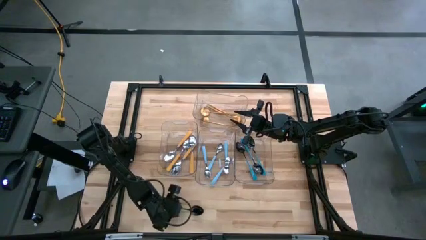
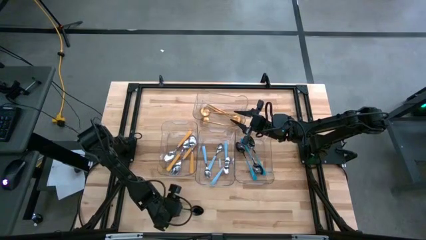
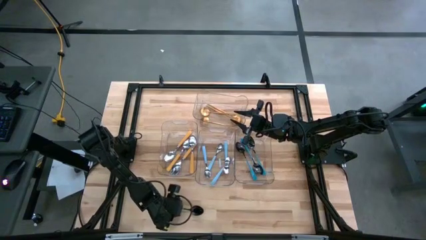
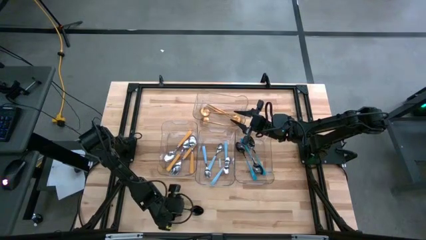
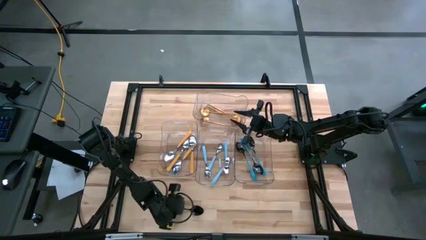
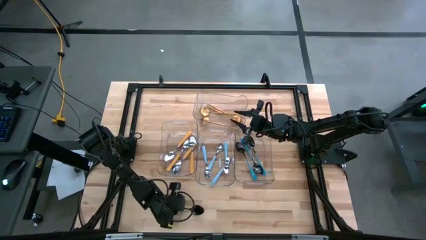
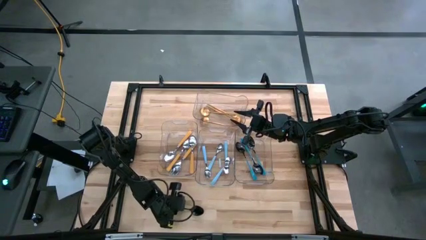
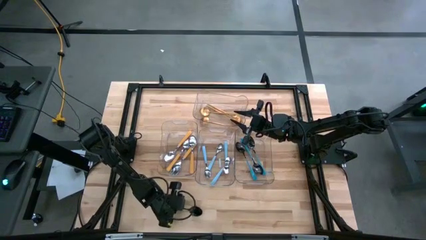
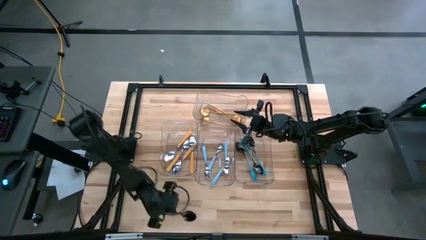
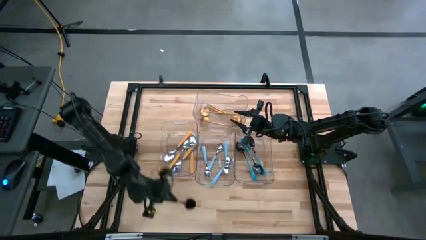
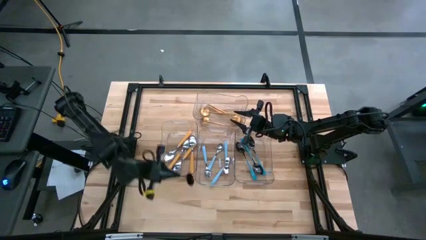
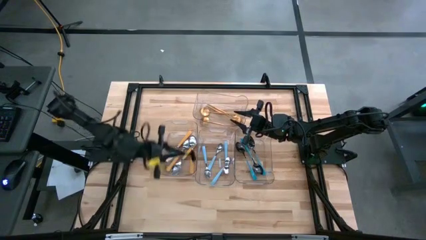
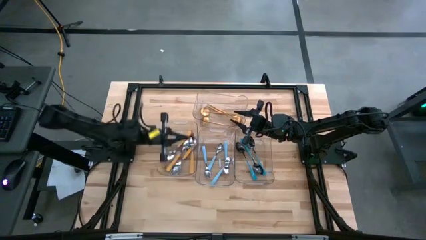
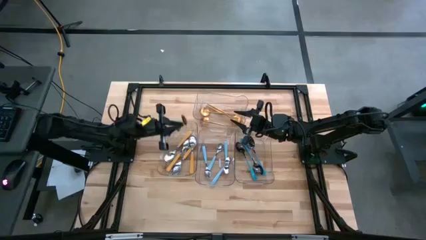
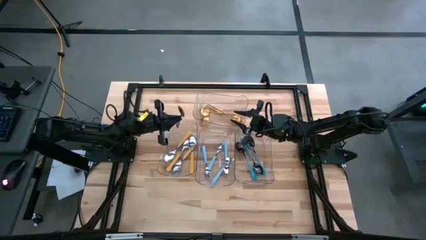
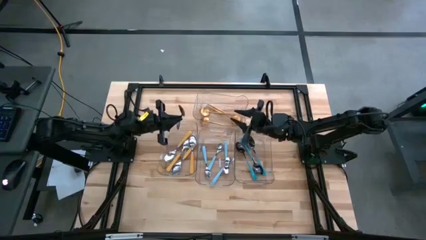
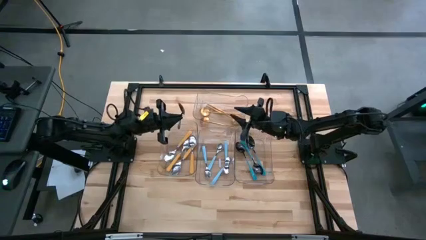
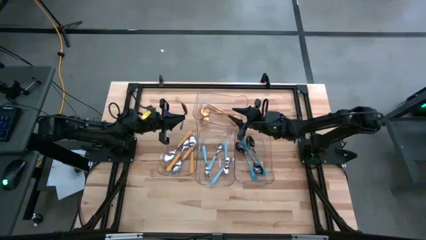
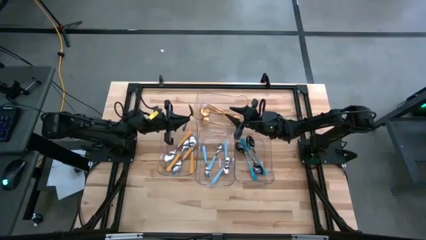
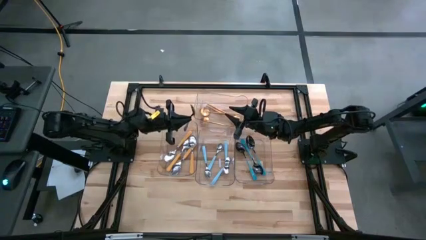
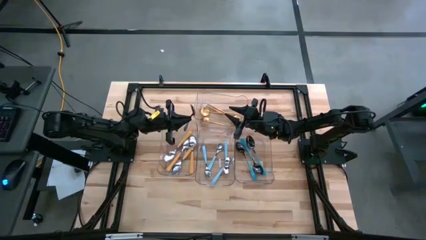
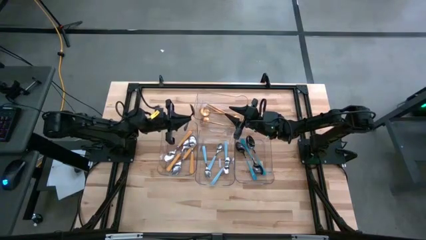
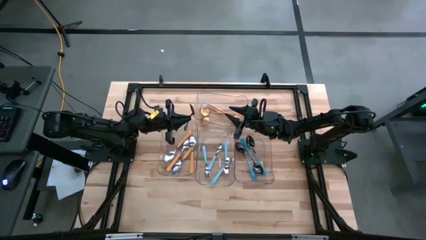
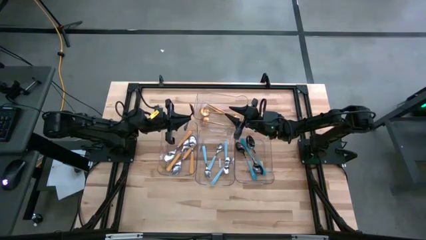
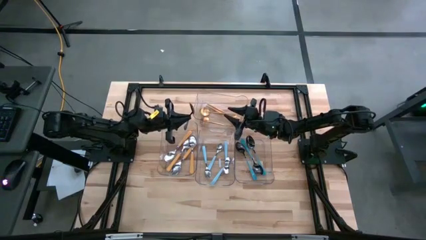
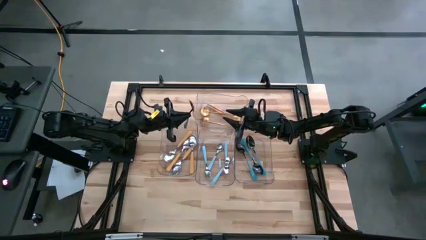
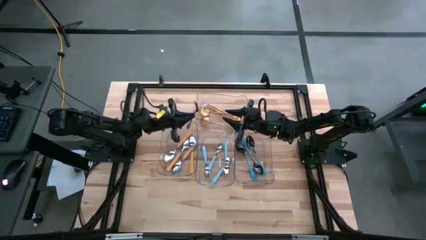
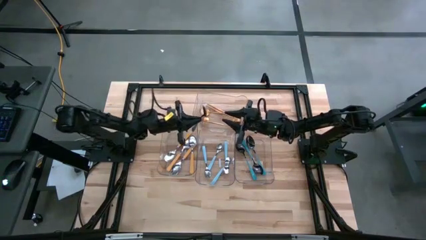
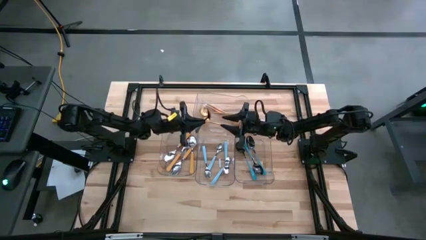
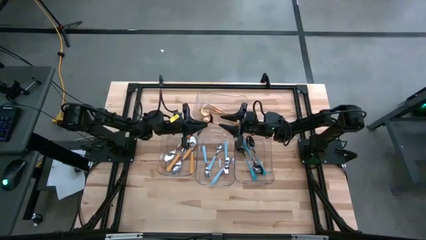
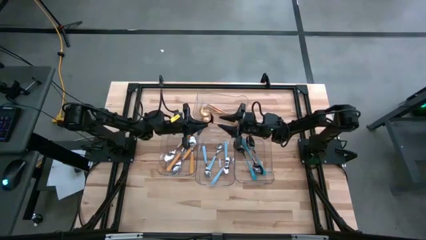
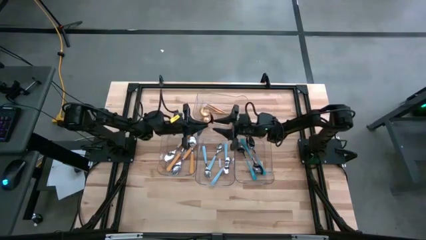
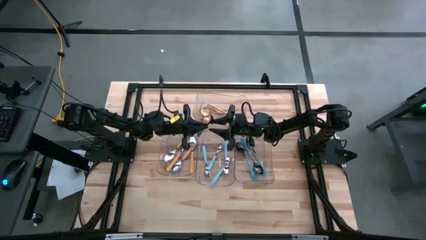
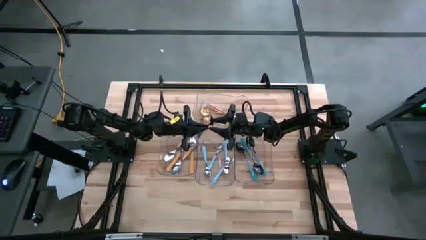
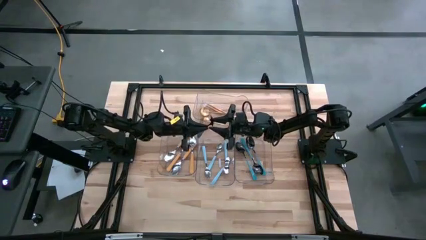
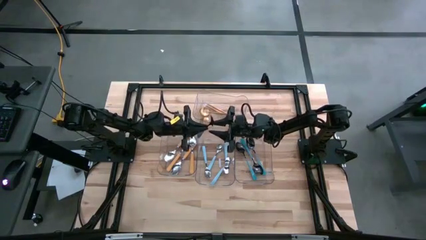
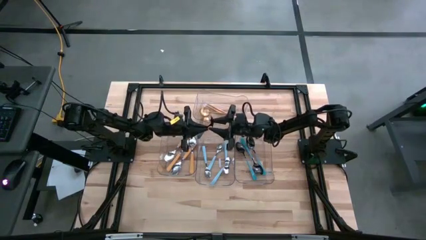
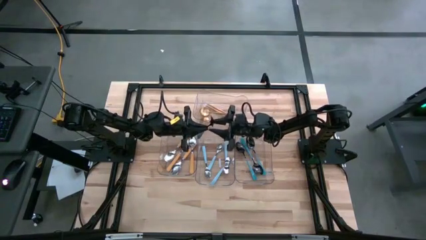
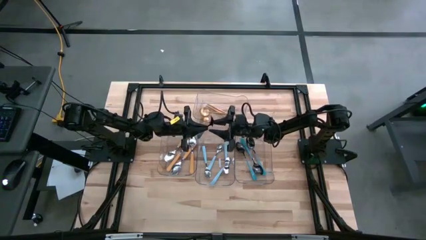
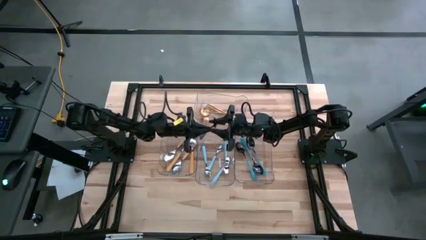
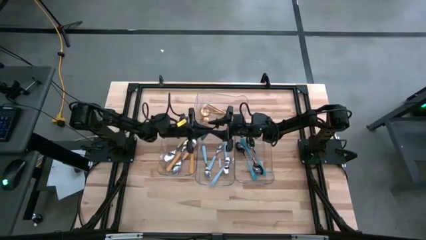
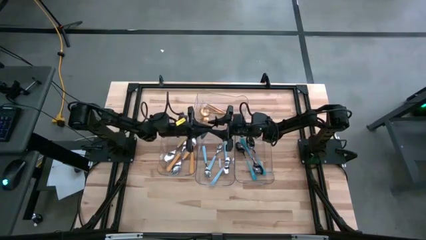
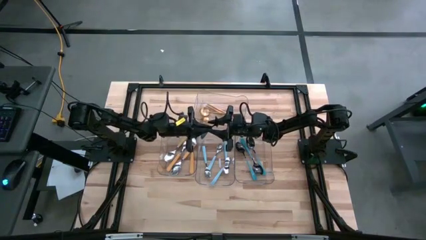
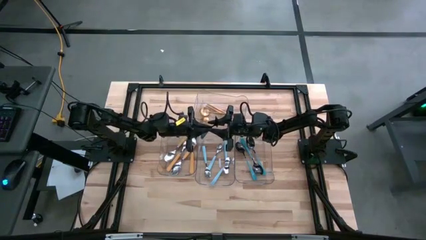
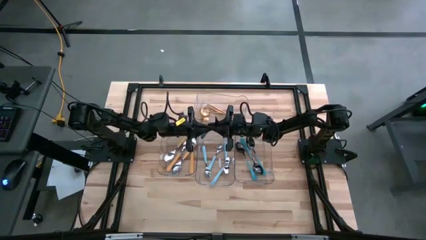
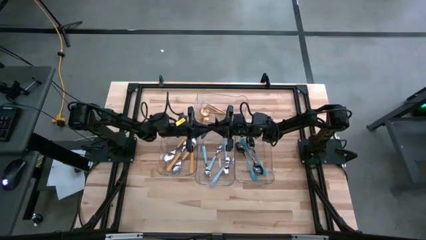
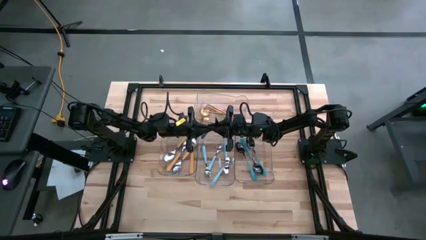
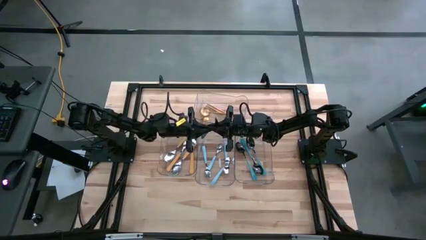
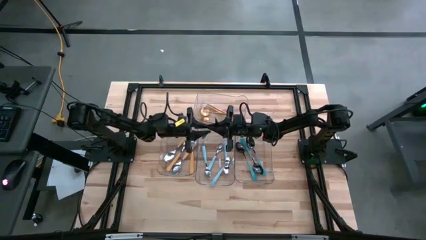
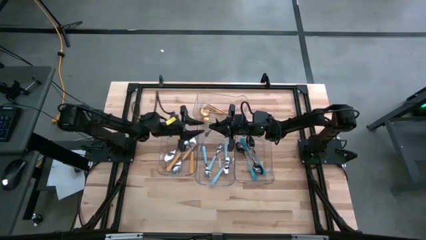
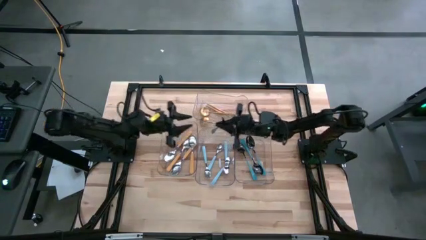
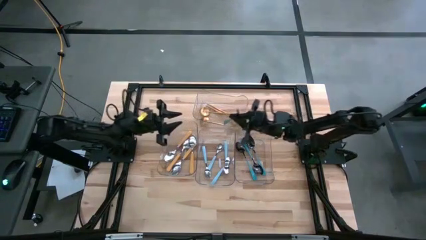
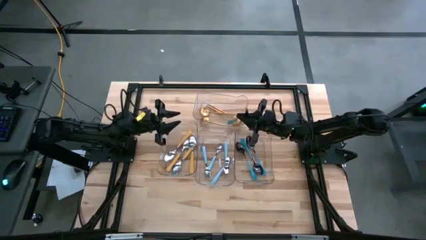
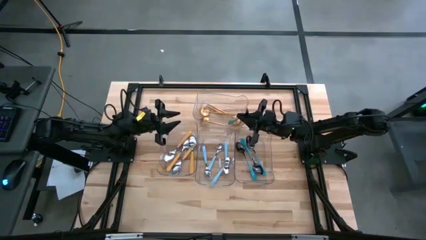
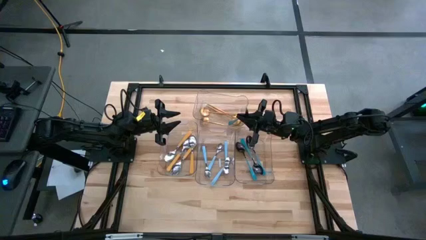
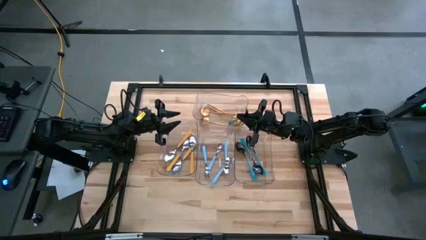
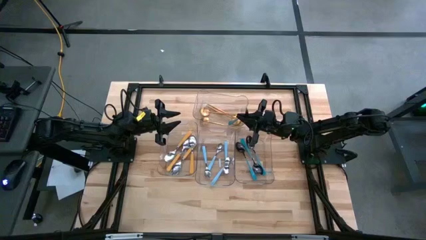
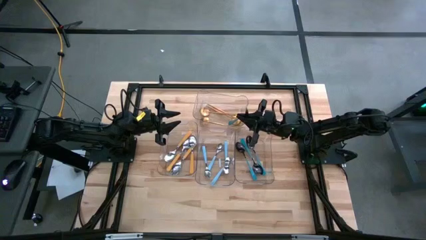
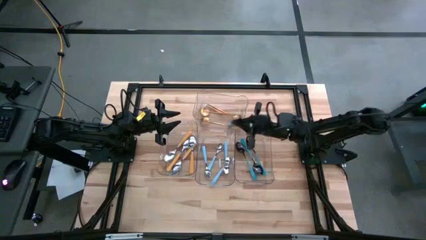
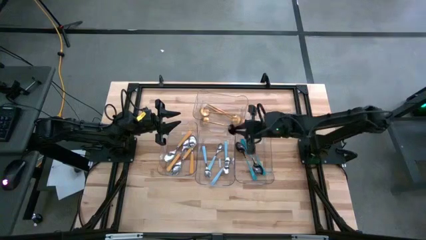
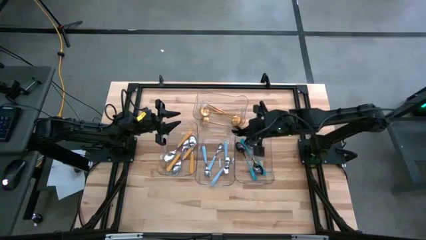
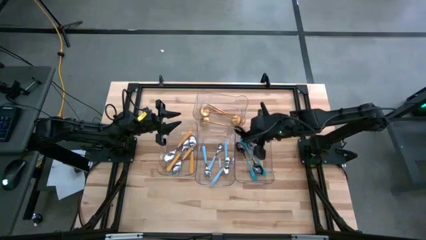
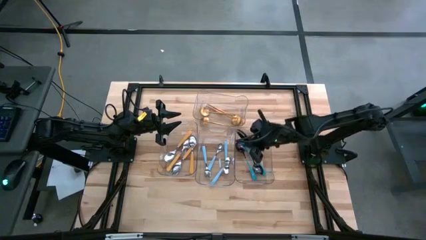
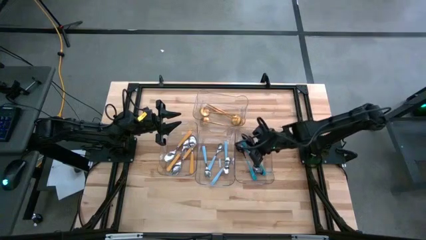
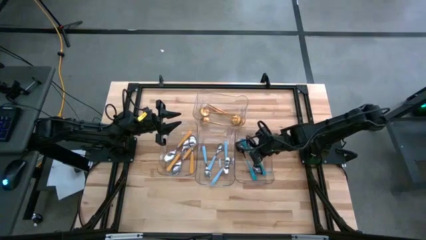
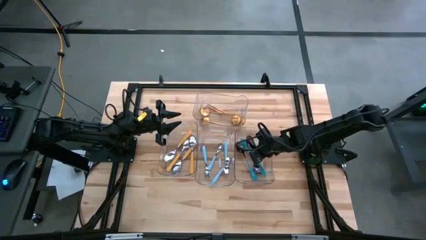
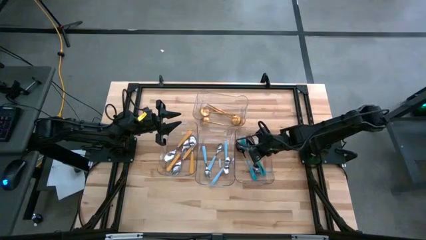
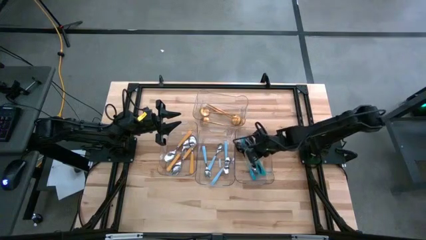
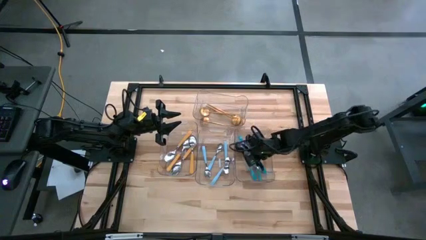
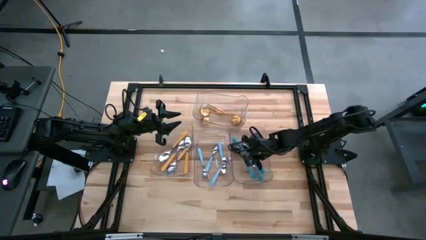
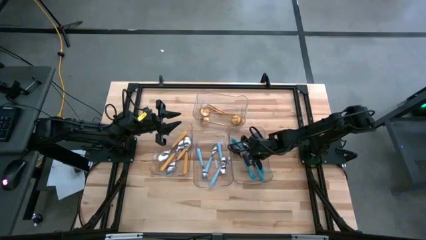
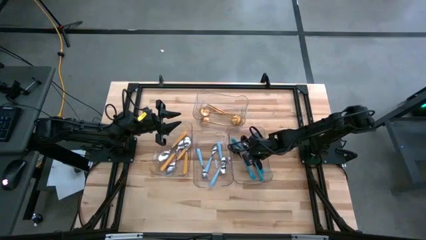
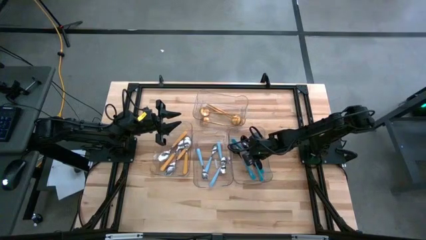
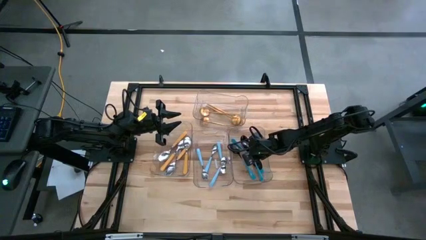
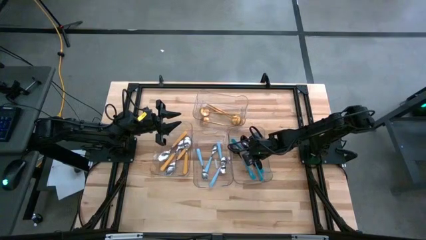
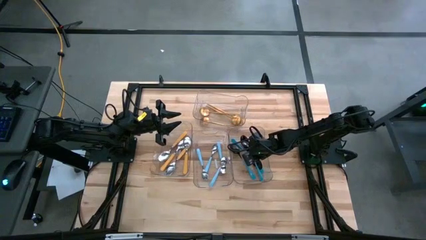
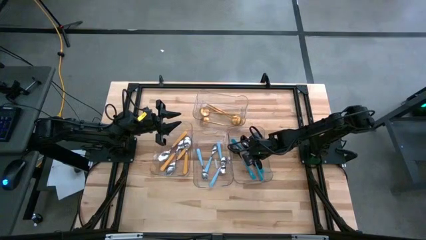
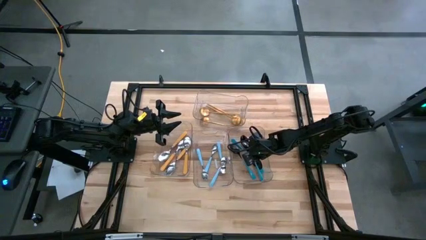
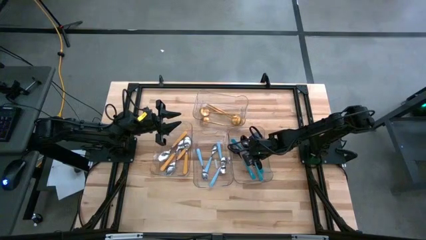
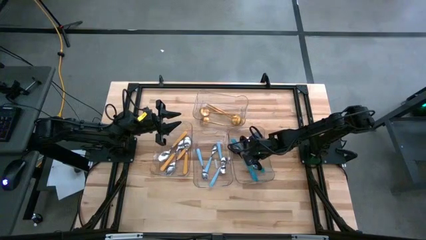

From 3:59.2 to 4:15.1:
Task: Sort silverware by color (type)
Put the blue spoon into the right transparent bin

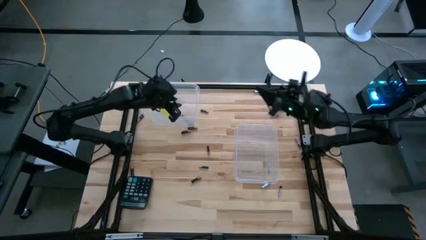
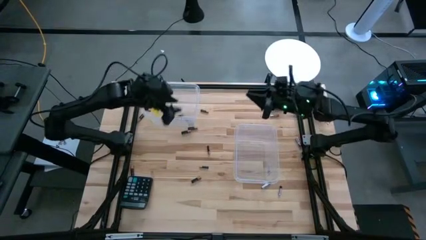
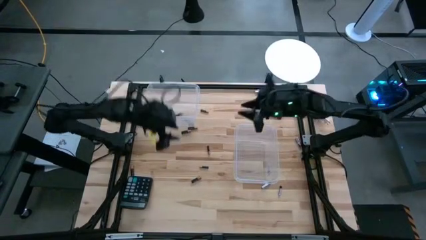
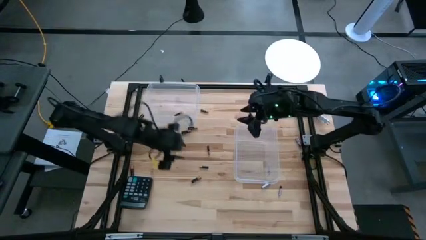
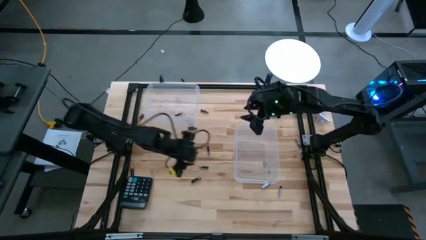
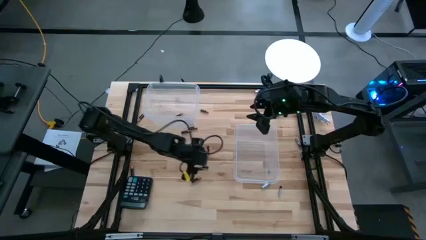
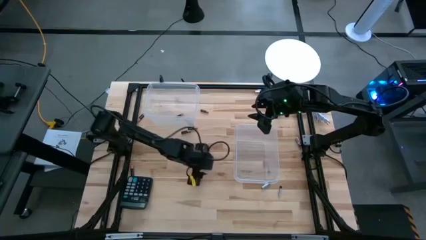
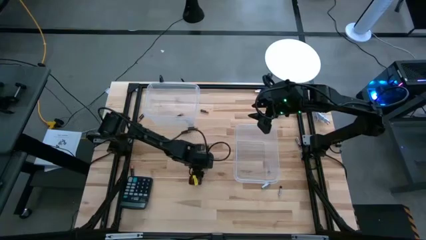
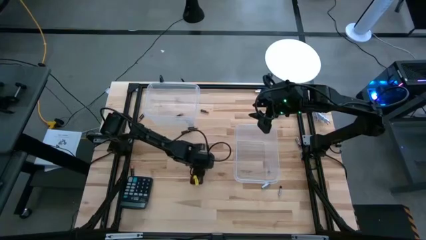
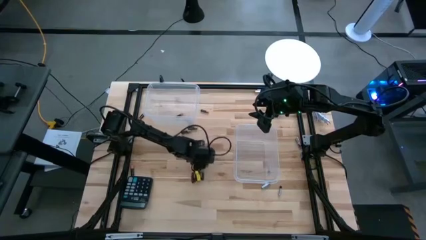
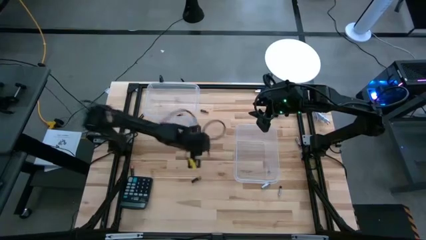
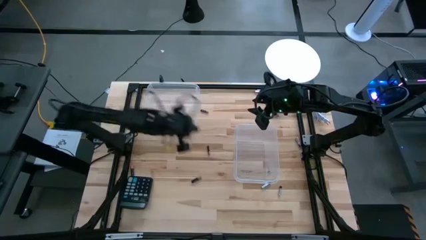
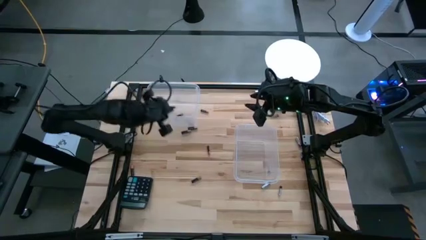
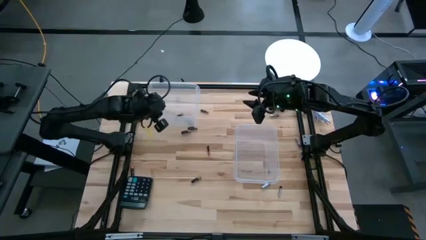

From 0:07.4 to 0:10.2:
Task: Sort batteries
Put the black battery into the left transparent bin
